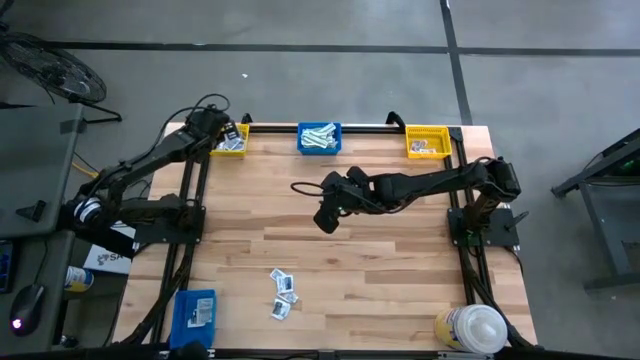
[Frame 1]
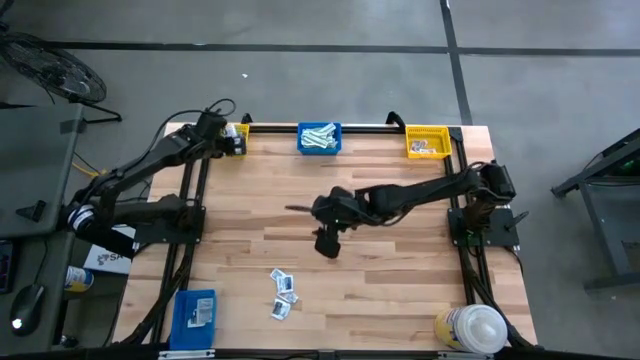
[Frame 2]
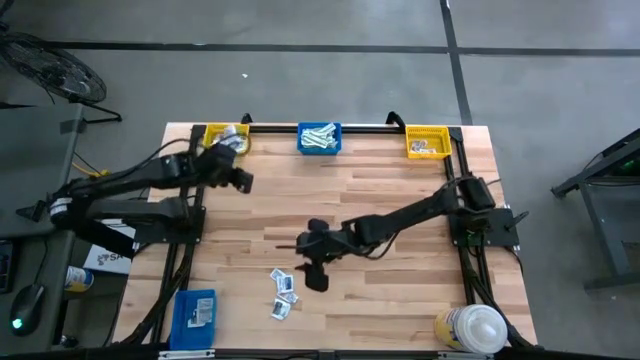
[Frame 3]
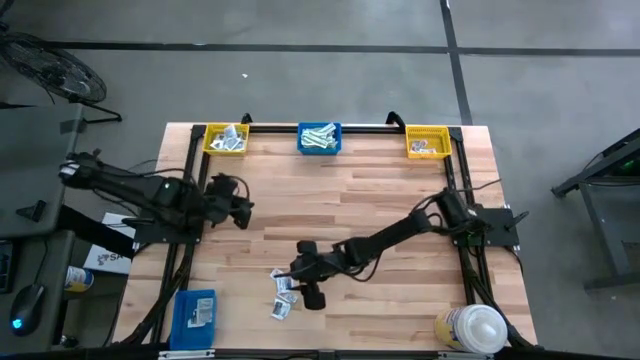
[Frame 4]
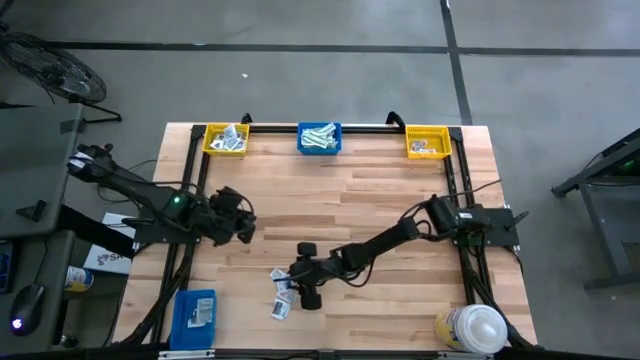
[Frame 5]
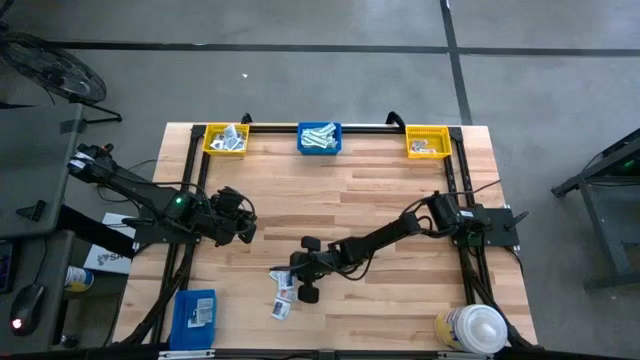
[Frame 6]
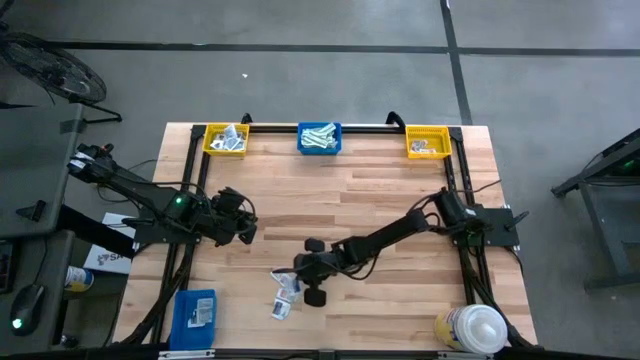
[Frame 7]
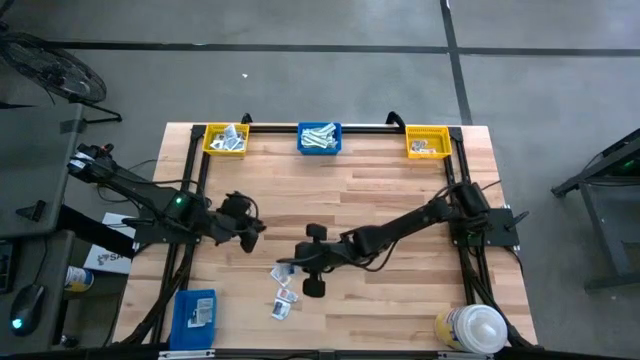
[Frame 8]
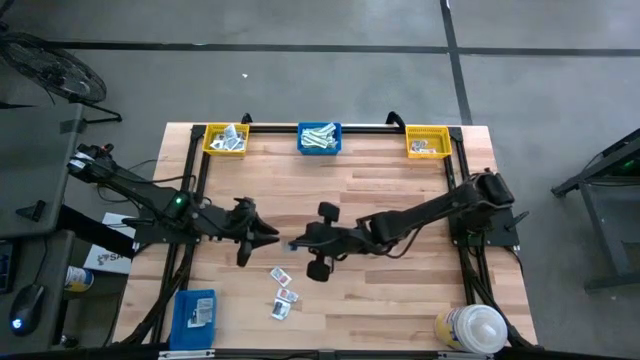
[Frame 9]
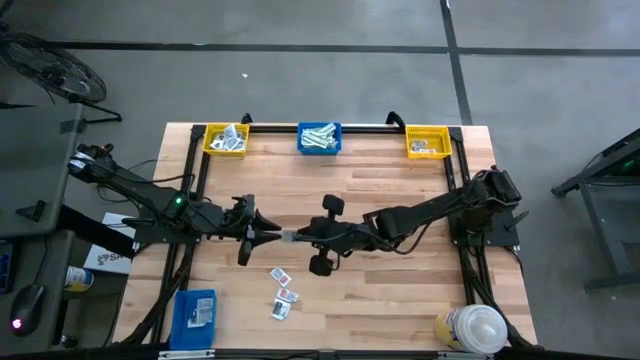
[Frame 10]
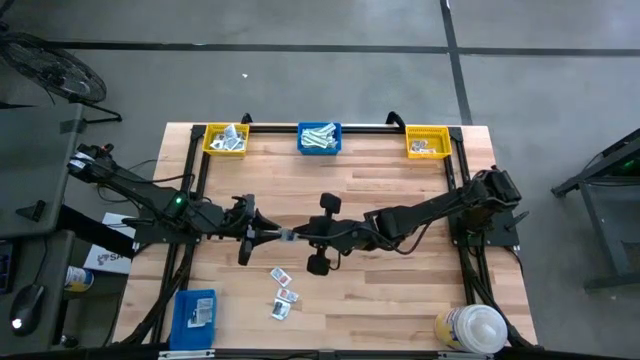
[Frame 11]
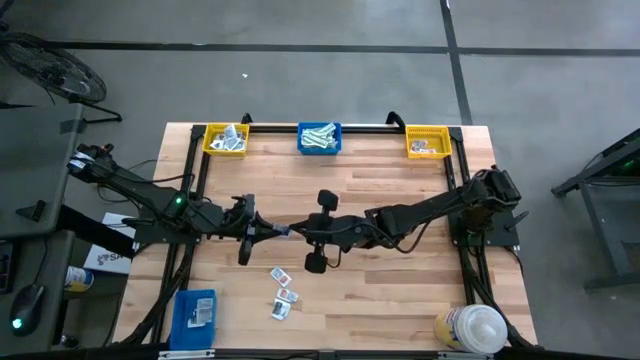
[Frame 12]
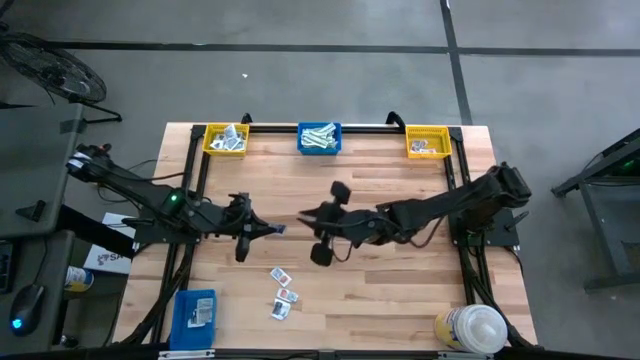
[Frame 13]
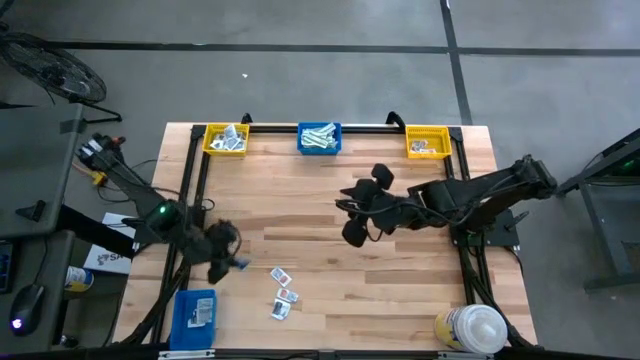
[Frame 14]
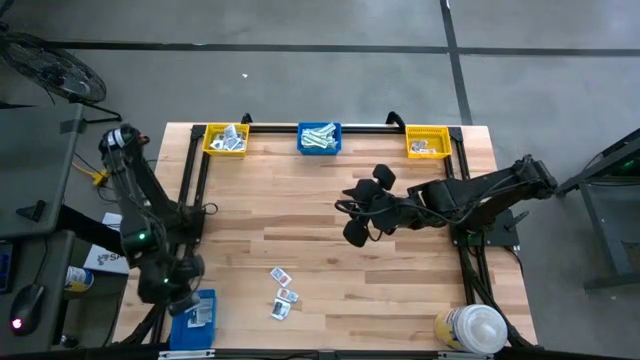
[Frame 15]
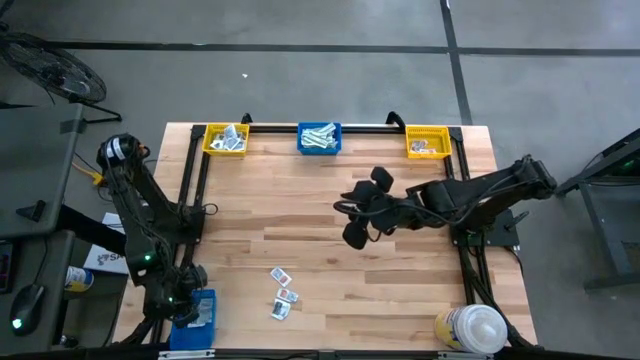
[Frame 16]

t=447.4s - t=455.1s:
Task: Pick & Place First Aid Supplies
Put the blue alcohol pad into the bottom blue bin

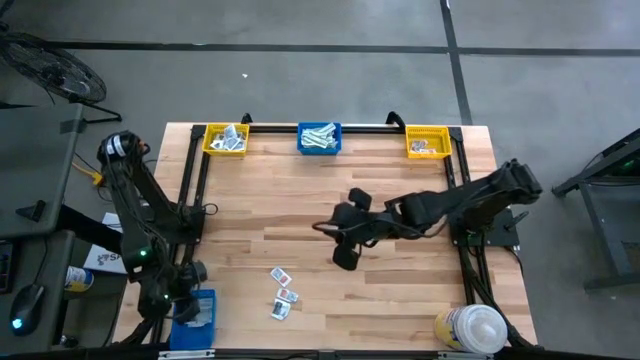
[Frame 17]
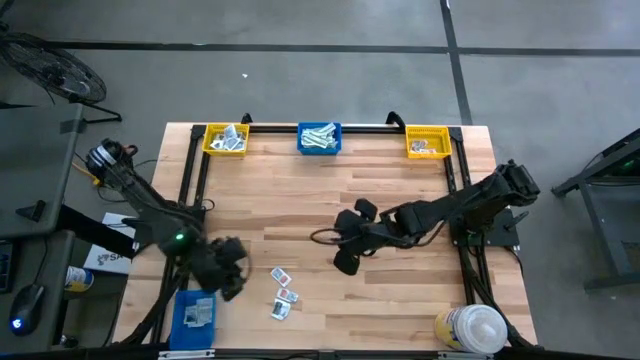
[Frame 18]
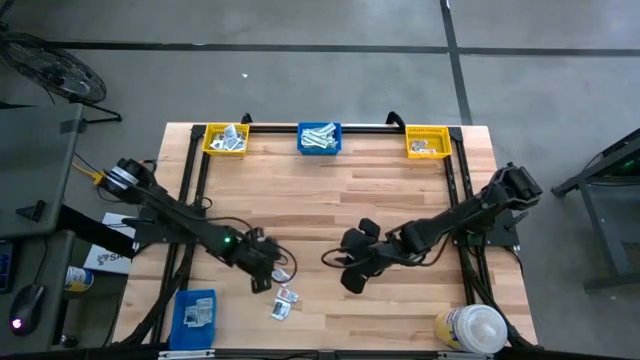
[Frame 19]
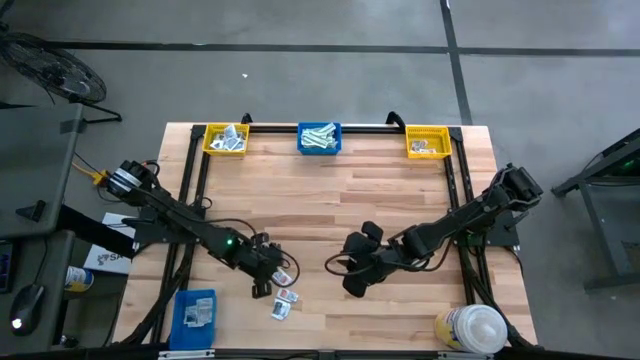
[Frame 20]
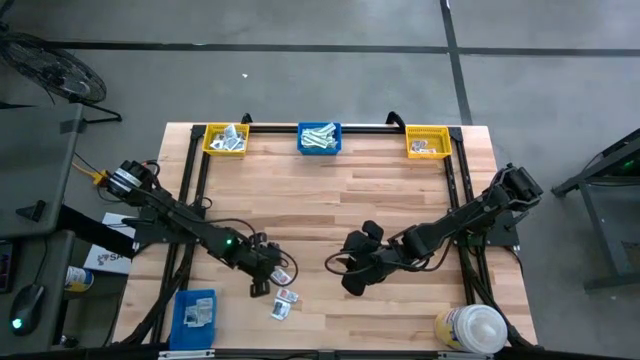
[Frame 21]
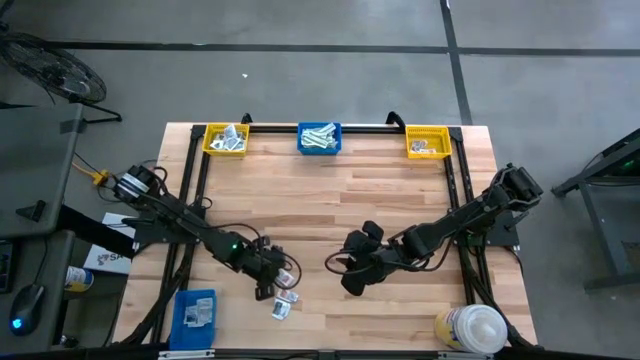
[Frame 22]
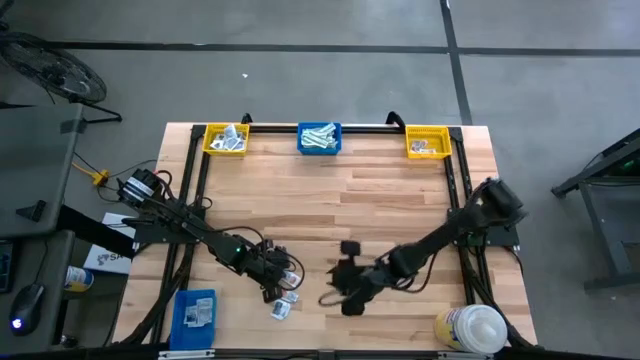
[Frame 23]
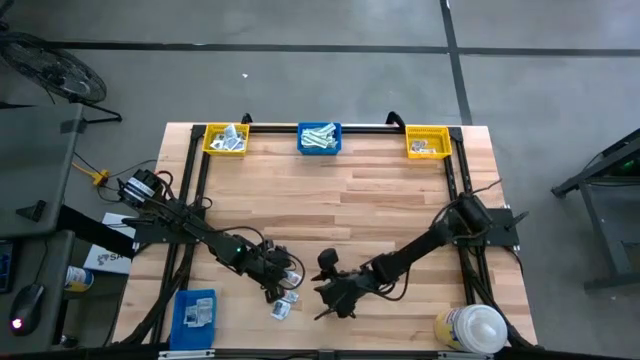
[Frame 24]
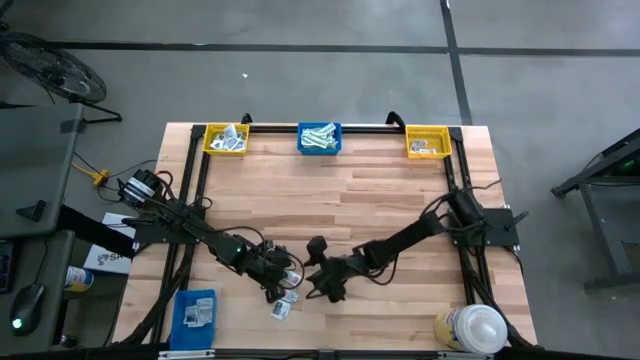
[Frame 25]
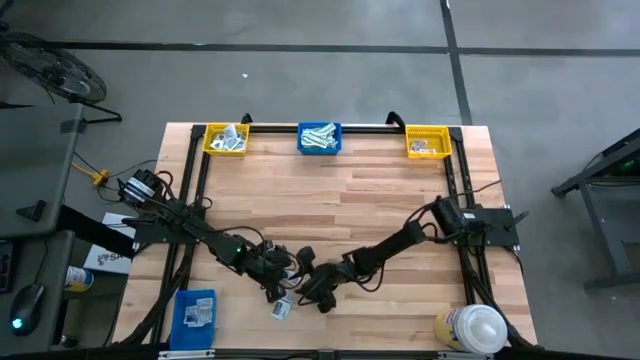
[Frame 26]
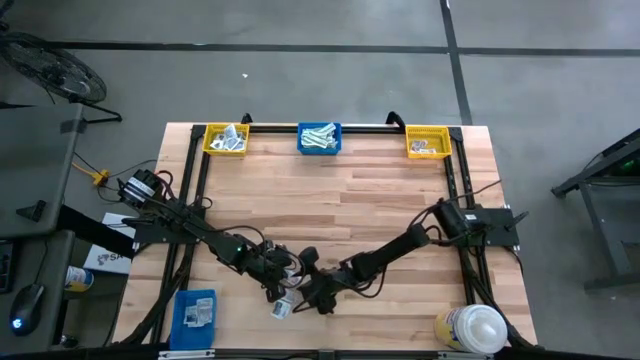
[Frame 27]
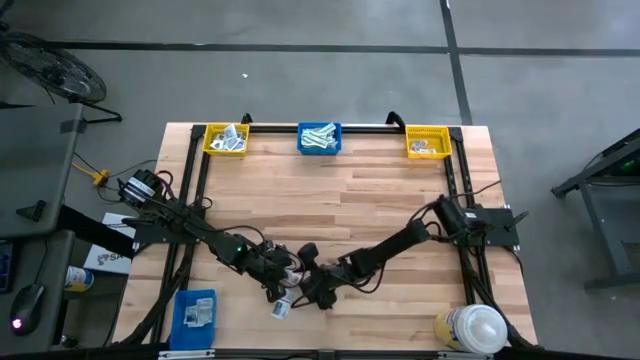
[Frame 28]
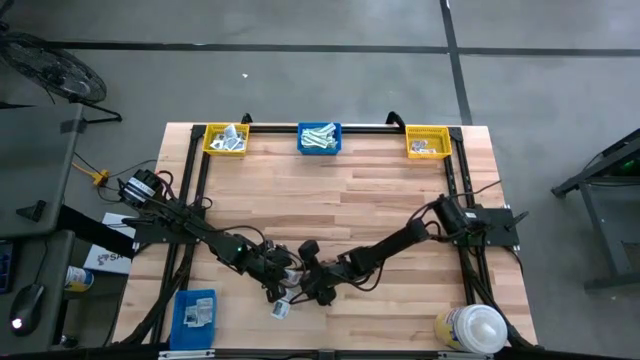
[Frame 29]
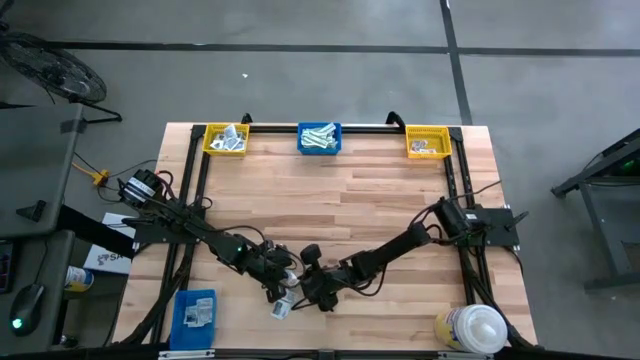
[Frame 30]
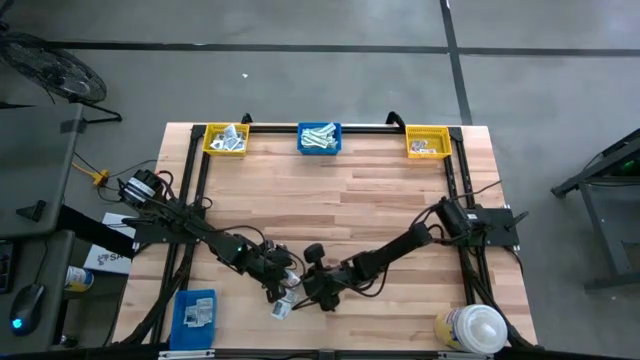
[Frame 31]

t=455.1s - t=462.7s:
Put the orange ointment pack into the right yellow bin

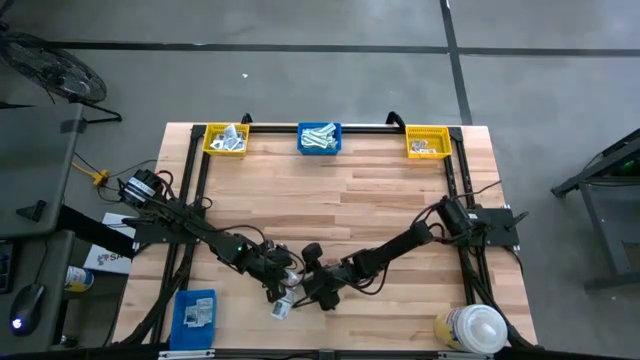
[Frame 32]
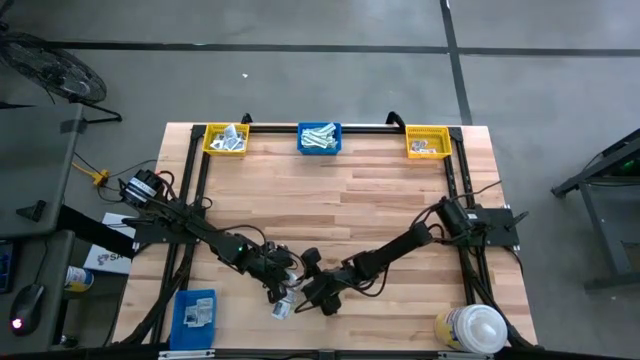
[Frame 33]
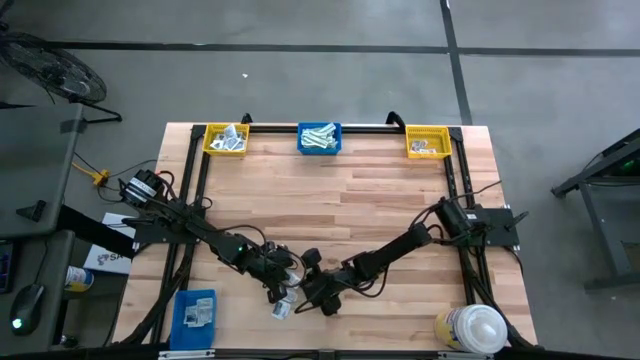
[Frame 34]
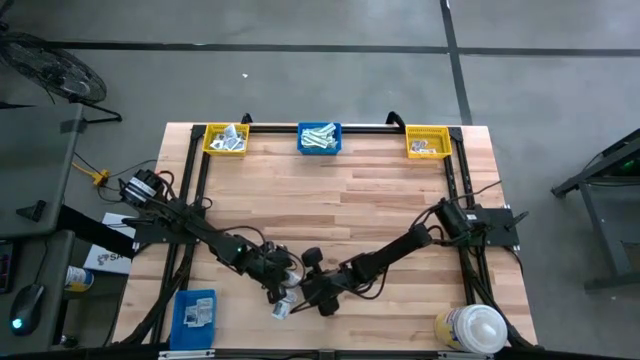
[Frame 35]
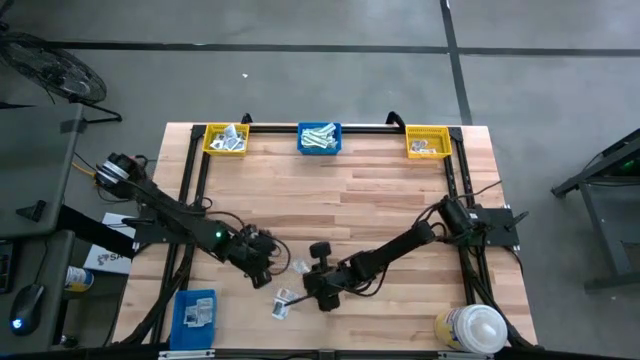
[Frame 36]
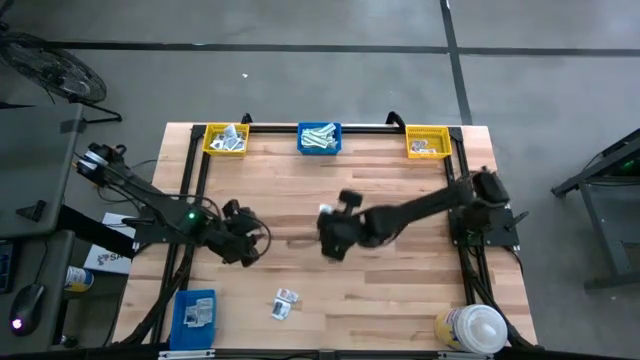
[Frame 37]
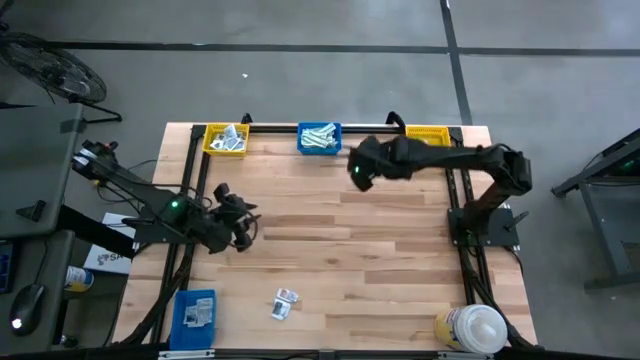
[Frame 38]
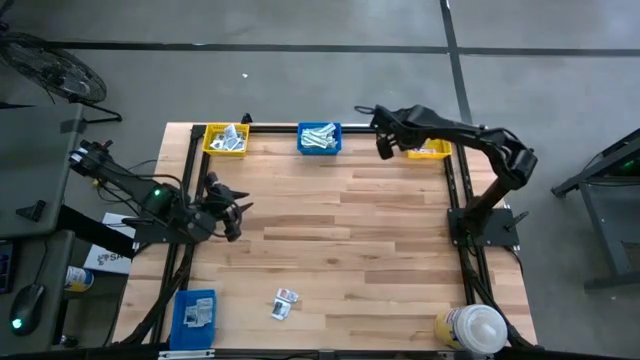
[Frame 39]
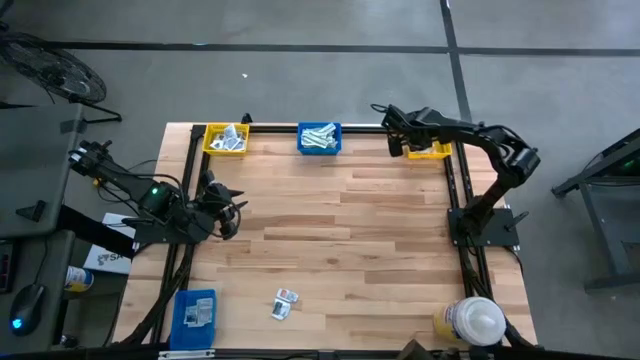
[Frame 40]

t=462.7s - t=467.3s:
Put the orange ointment pack into the right yellow bin

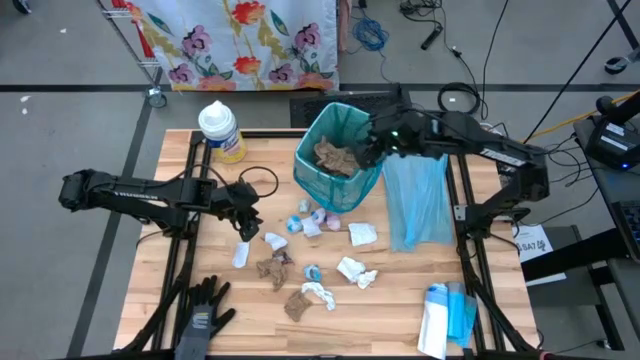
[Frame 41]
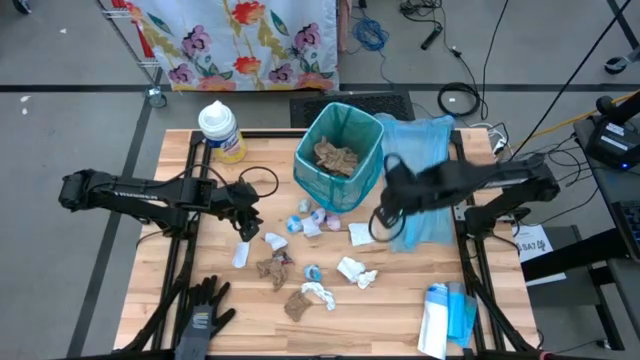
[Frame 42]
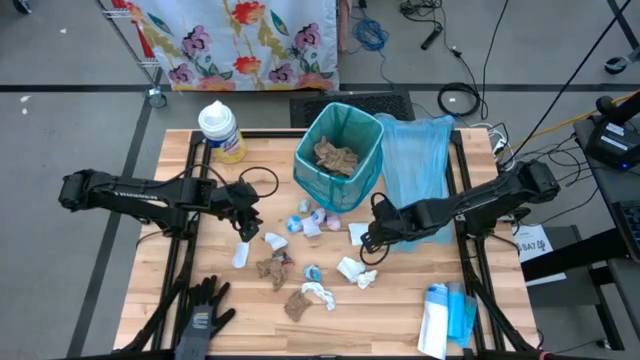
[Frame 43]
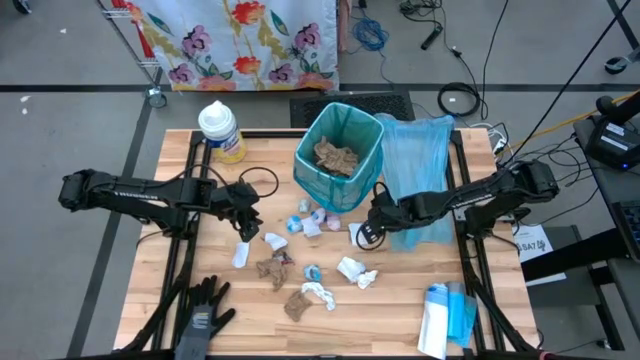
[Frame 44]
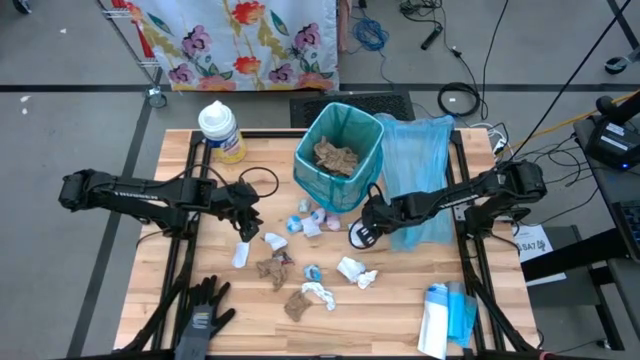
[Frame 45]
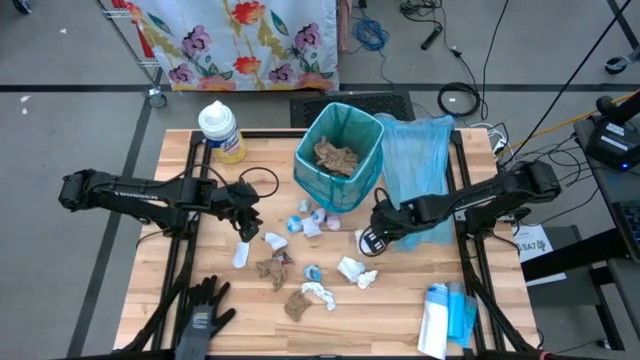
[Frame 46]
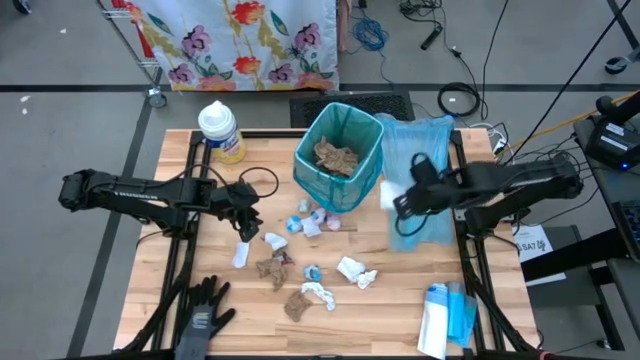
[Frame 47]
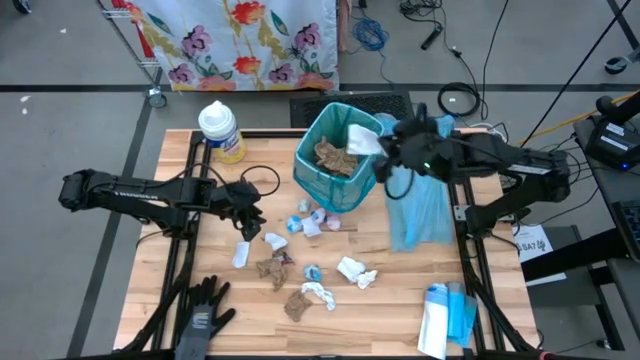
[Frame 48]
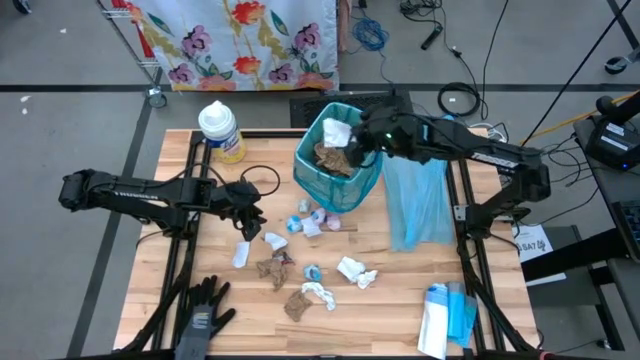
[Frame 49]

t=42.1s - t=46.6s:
Task: place trash/remove bag and relplace
Put the white paper piece into the trash bin
